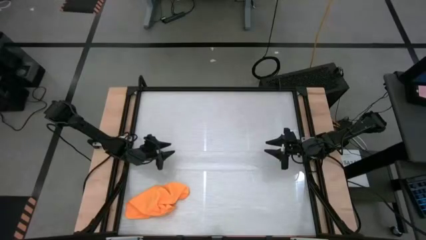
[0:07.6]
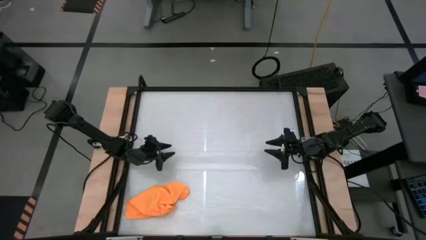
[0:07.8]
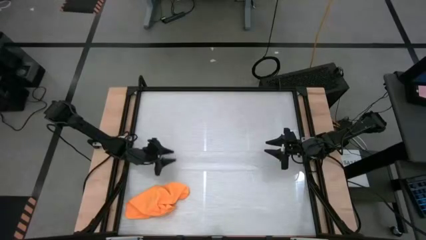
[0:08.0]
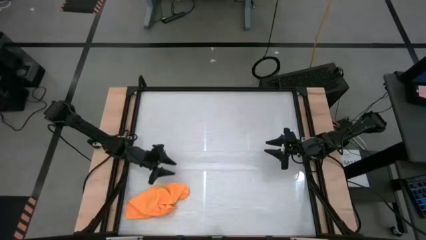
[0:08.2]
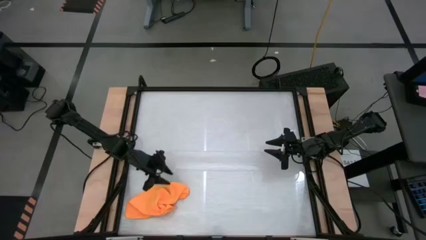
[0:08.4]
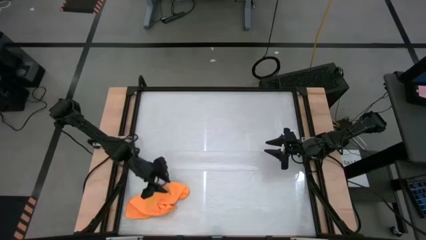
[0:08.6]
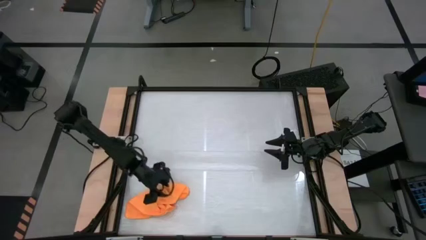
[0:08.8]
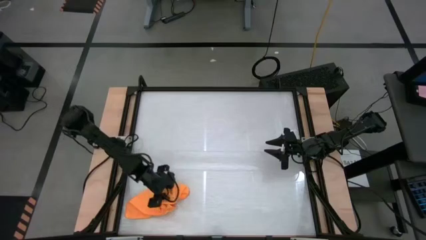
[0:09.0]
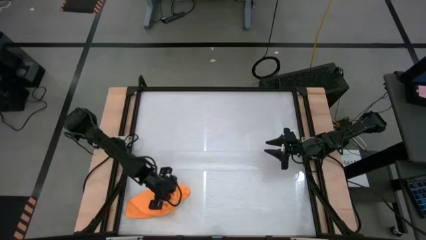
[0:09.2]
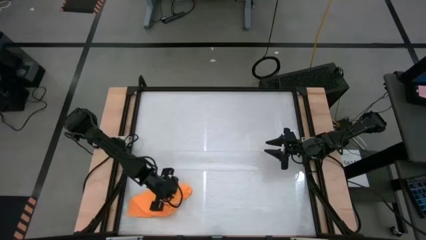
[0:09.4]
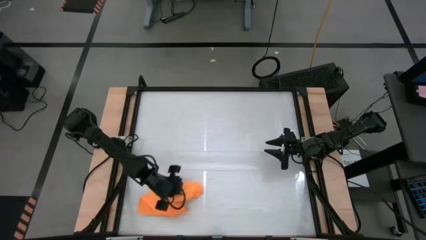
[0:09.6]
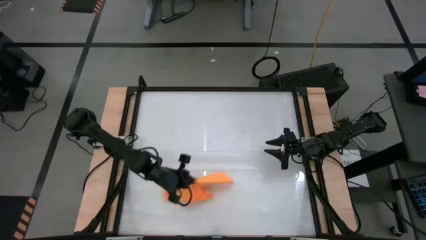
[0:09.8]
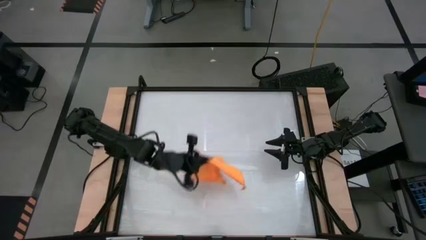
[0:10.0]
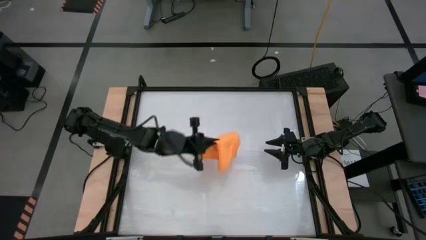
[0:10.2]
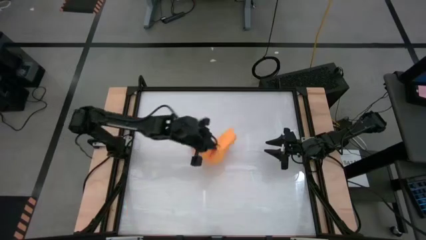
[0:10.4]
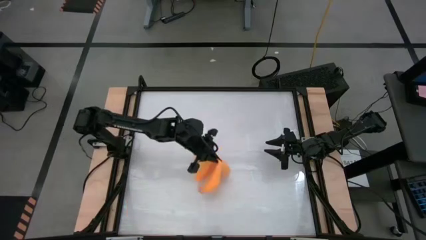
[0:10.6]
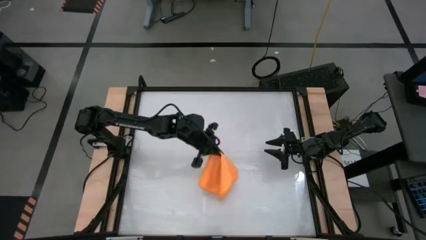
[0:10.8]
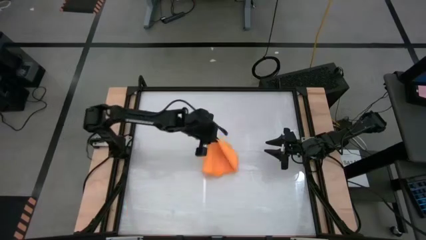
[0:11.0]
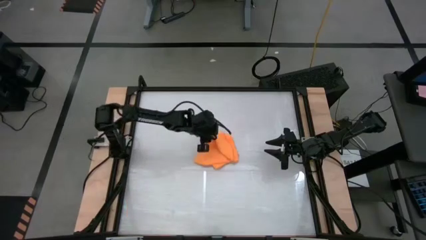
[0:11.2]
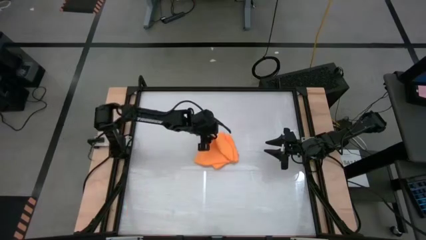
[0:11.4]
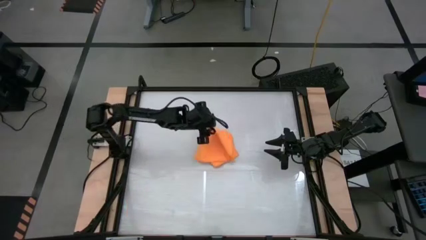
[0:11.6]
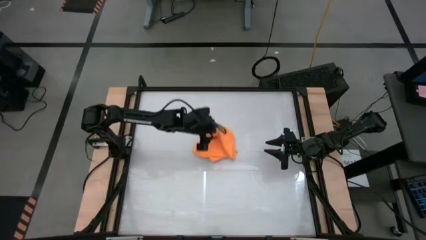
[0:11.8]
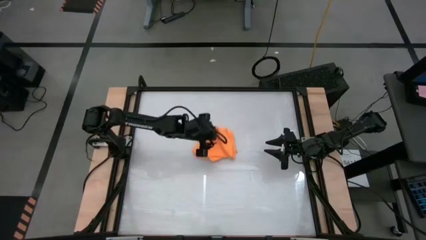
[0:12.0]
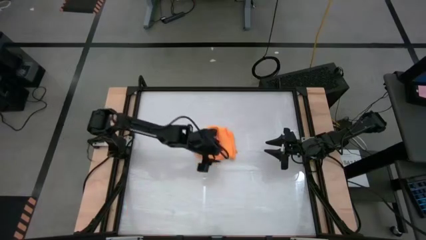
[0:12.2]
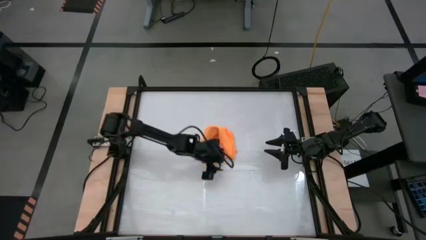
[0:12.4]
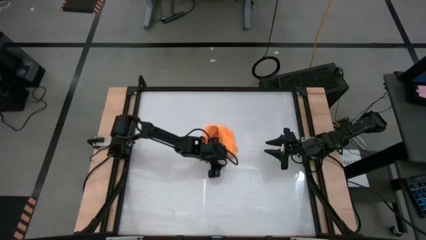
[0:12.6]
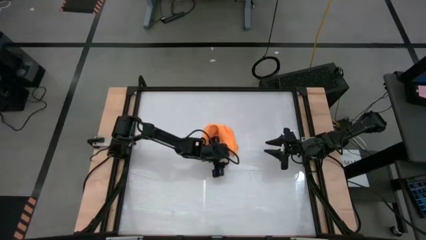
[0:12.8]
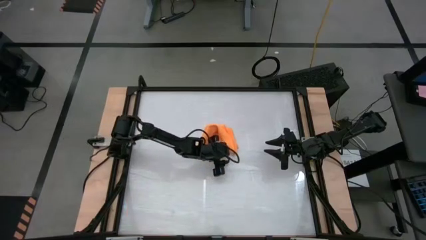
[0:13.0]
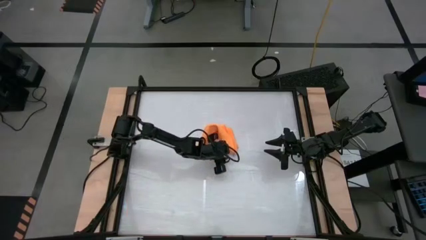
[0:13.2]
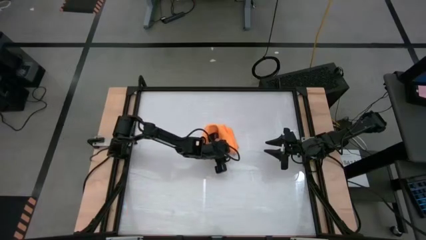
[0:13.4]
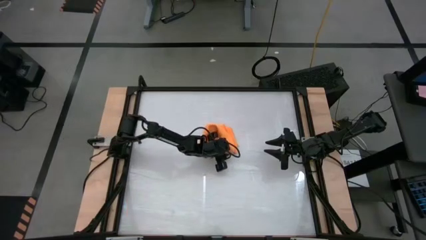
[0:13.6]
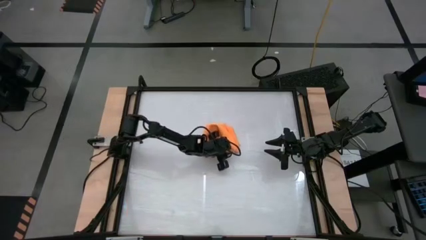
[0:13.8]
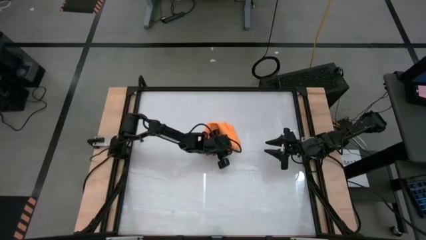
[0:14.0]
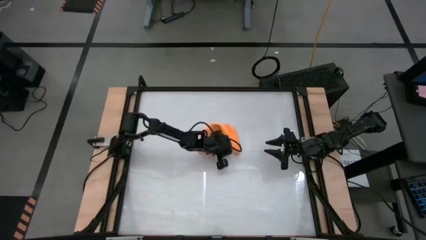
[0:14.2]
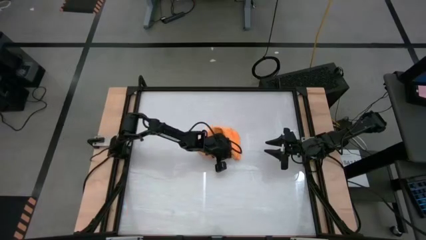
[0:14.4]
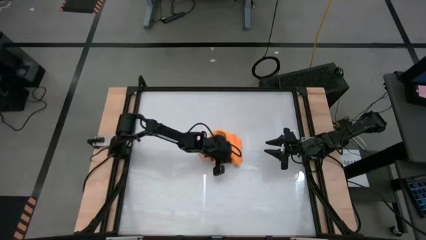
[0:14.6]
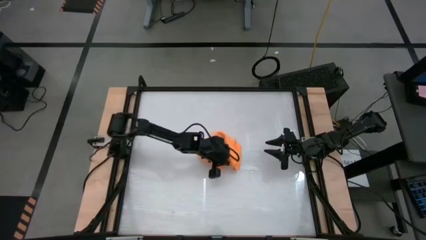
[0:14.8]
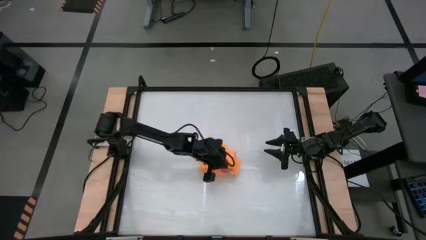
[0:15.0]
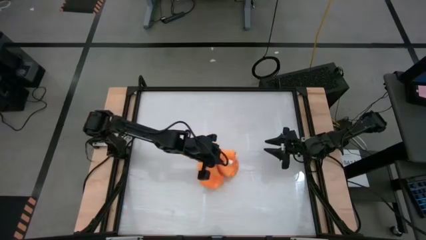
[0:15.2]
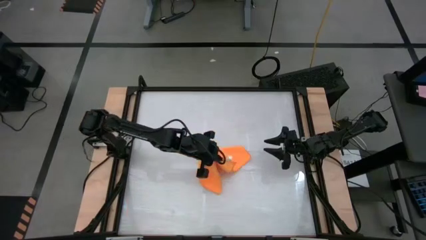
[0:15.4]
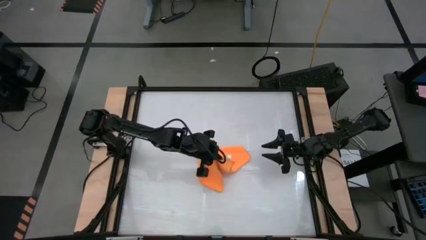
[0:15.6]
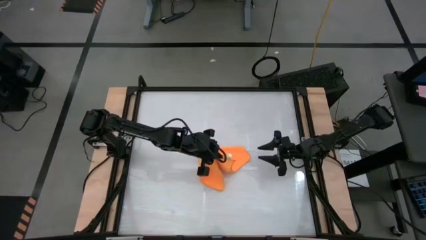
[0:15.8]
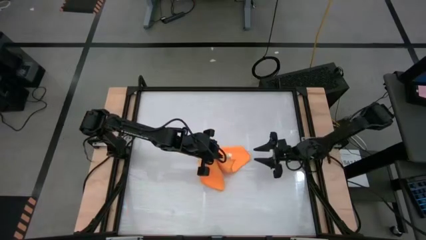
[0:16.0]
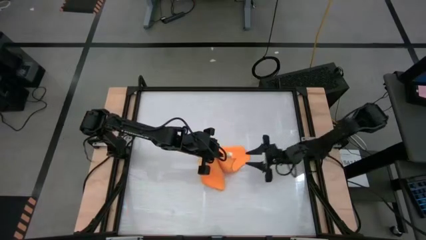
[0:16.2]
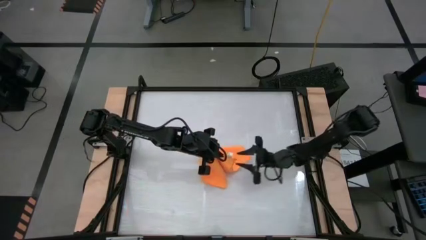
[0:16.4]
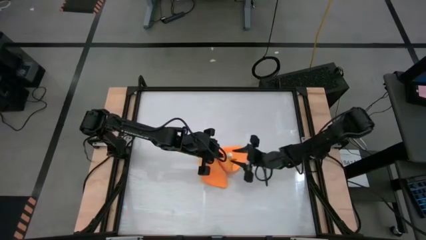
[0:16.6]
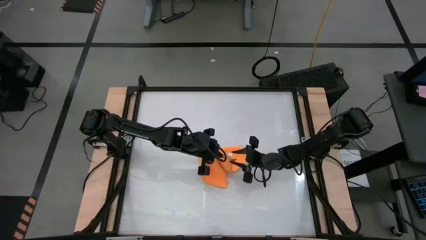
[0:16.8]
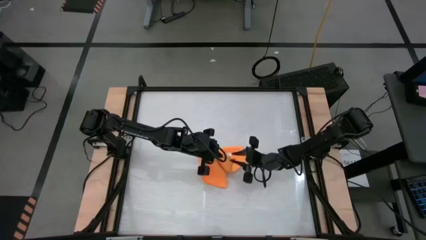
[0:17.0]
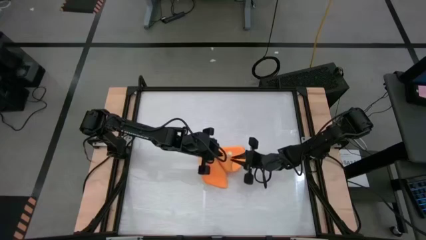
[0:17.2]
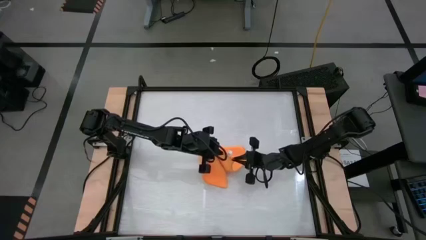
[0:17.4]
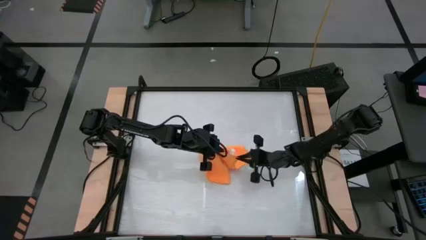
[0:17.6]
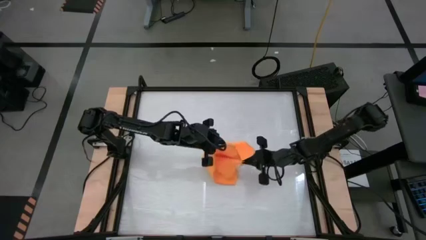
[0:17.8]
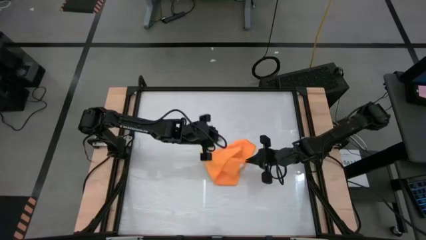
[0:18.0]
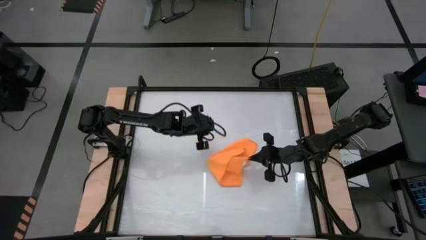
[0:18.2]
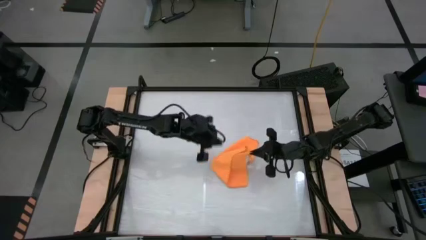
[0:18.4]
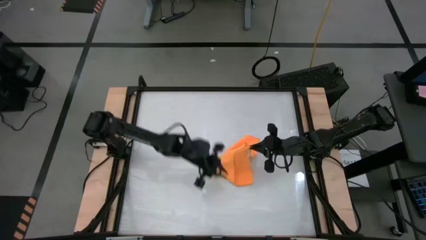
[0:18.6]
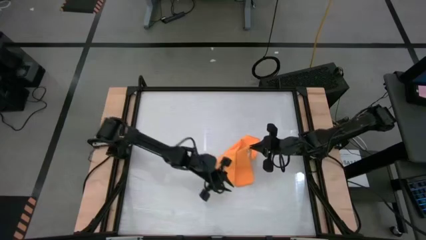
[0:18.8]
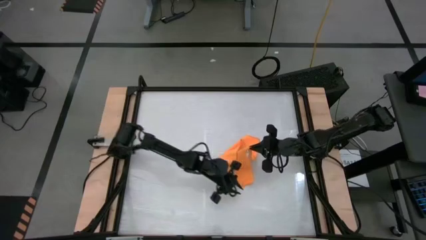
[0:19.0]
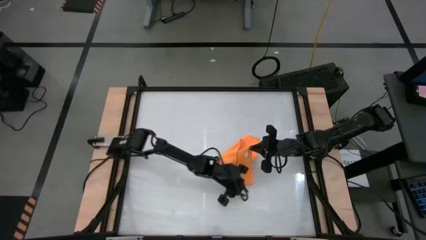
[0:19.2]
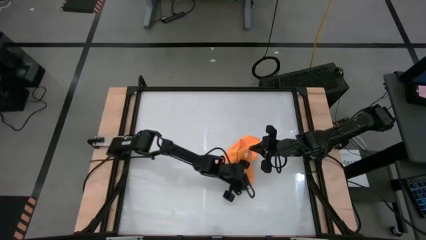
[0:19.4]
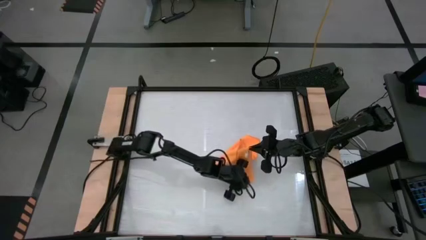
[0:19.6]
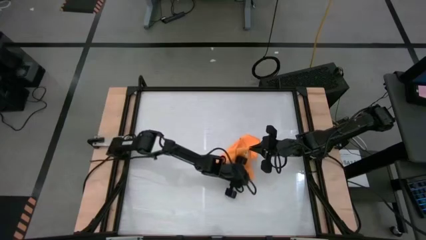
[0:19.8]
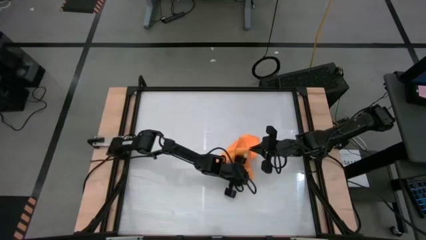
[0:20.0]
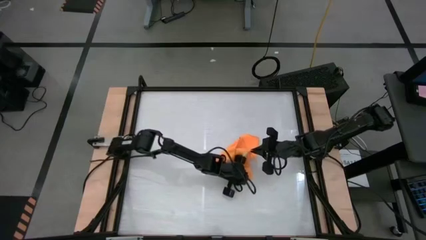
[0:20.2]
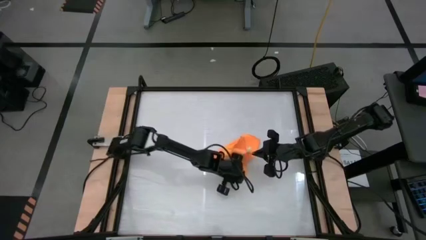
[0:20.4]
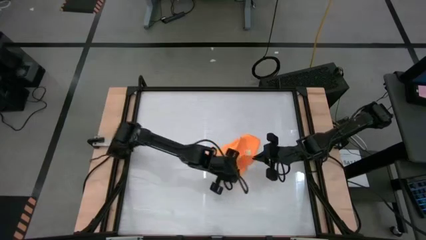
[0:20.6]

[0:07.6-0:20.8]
Task: Roll towel
Fold the orange towel
